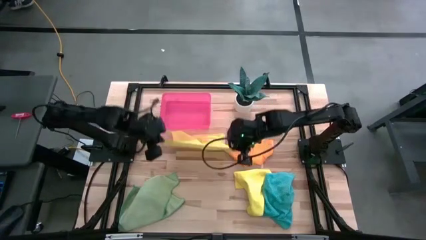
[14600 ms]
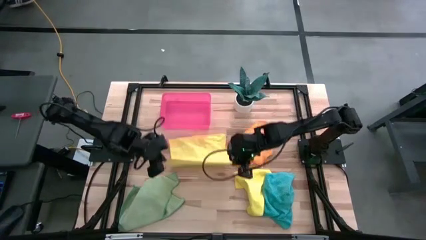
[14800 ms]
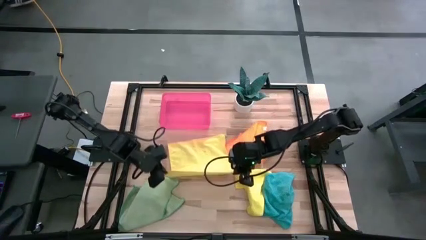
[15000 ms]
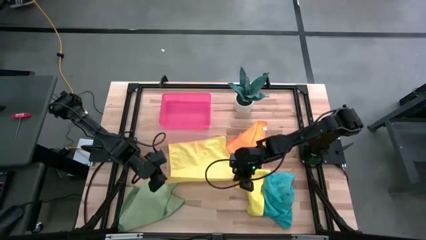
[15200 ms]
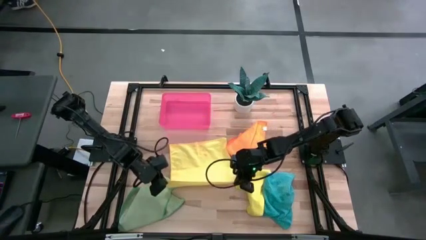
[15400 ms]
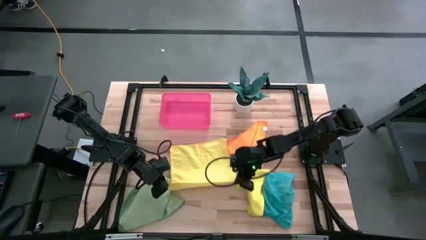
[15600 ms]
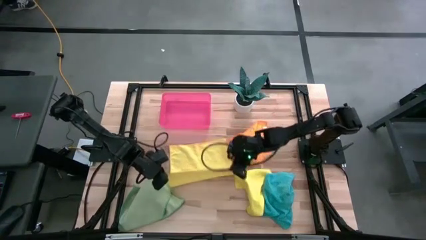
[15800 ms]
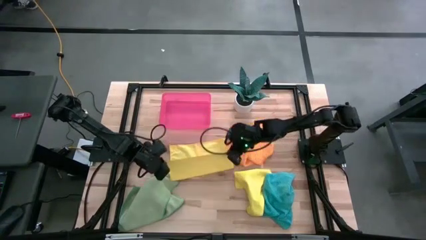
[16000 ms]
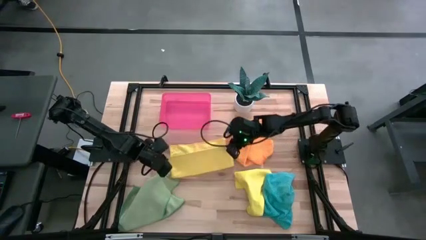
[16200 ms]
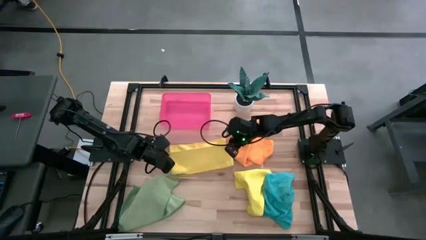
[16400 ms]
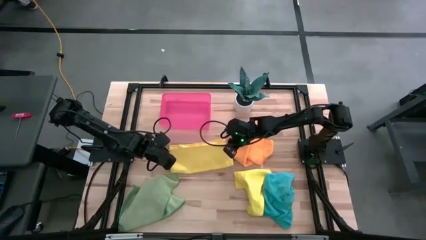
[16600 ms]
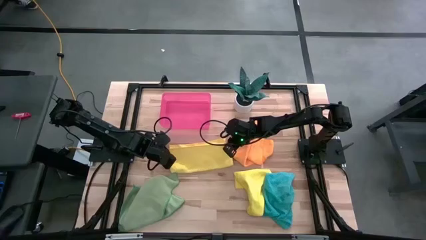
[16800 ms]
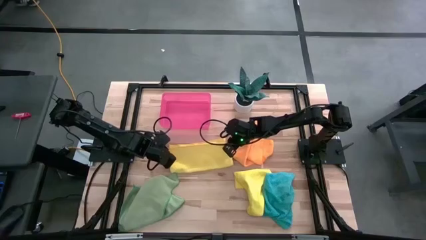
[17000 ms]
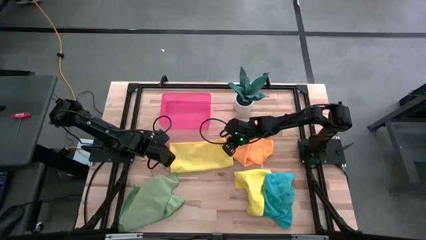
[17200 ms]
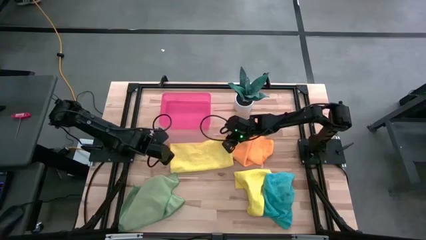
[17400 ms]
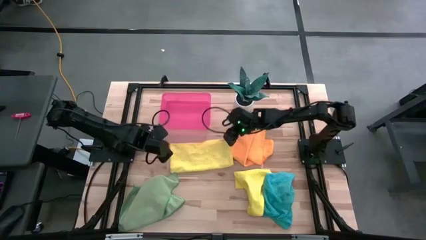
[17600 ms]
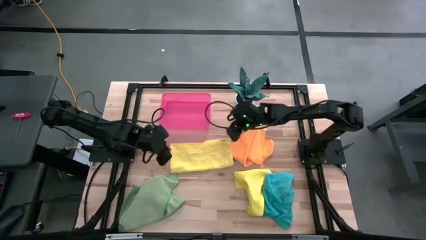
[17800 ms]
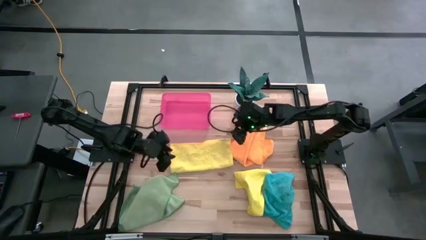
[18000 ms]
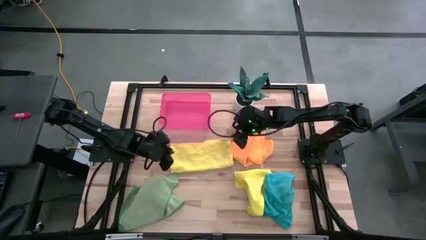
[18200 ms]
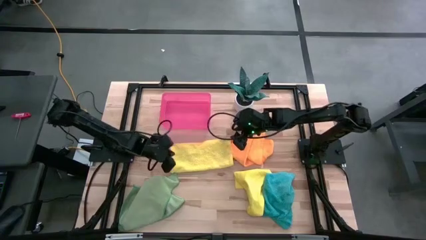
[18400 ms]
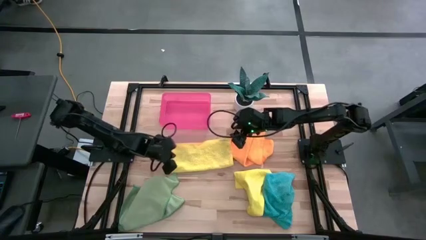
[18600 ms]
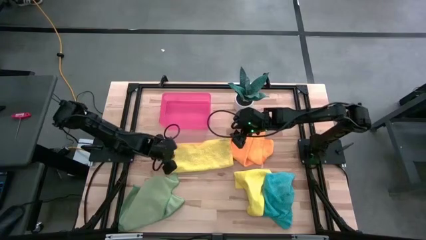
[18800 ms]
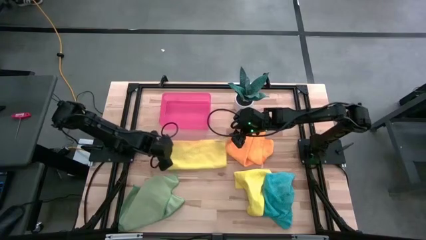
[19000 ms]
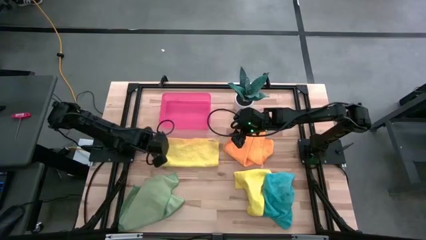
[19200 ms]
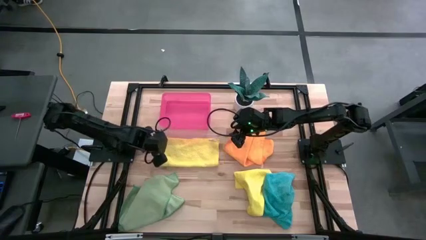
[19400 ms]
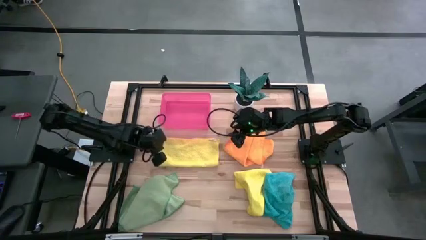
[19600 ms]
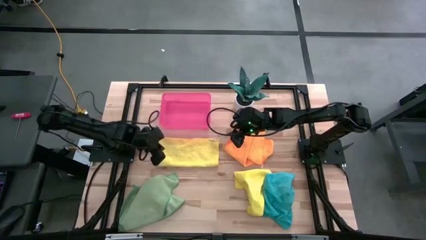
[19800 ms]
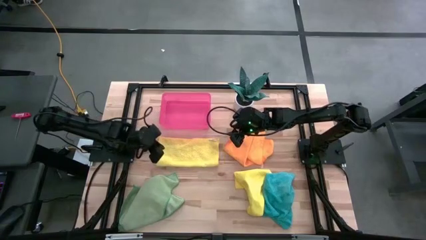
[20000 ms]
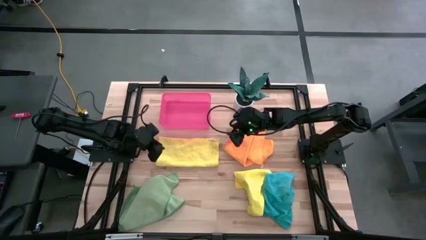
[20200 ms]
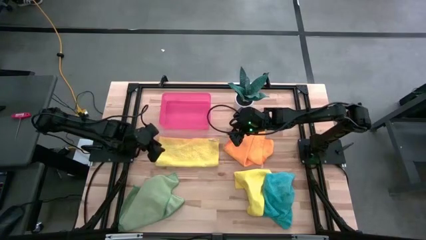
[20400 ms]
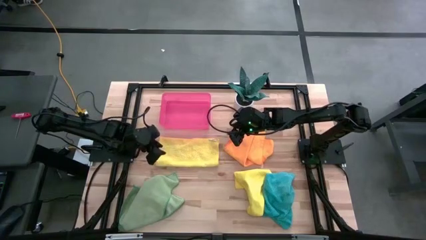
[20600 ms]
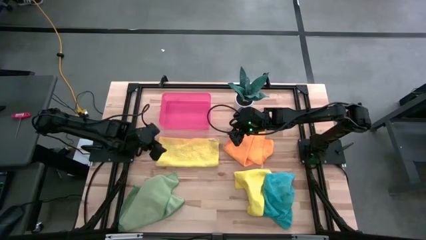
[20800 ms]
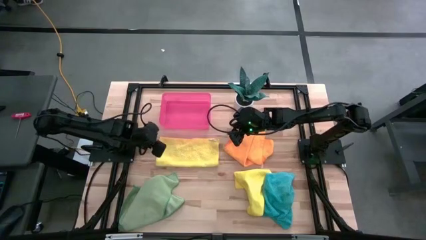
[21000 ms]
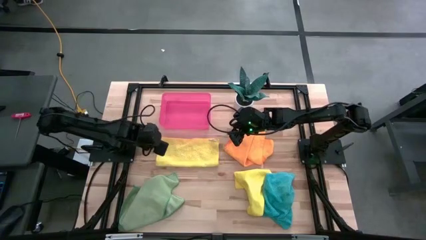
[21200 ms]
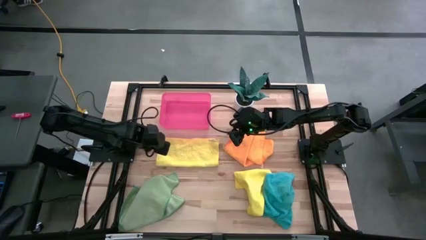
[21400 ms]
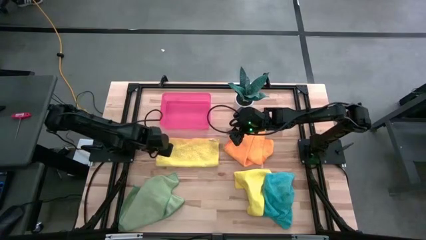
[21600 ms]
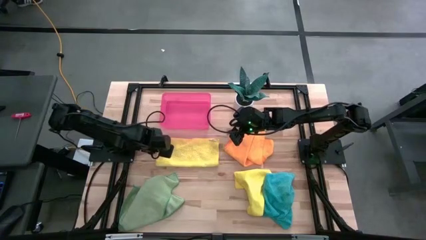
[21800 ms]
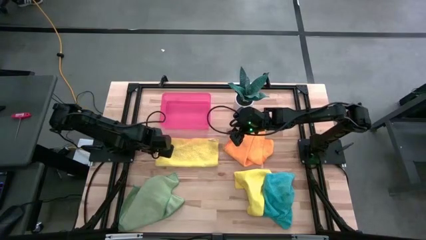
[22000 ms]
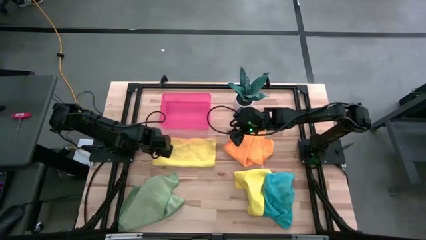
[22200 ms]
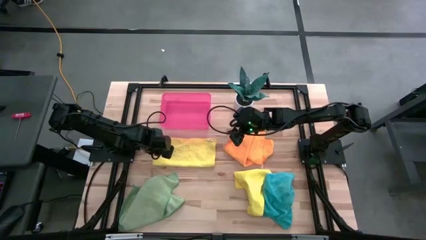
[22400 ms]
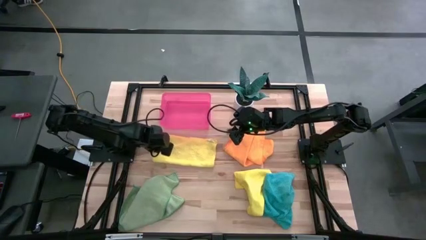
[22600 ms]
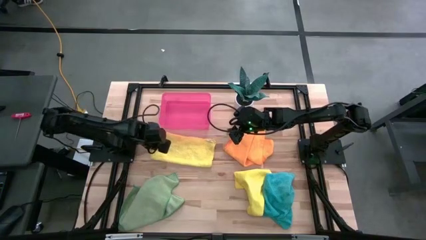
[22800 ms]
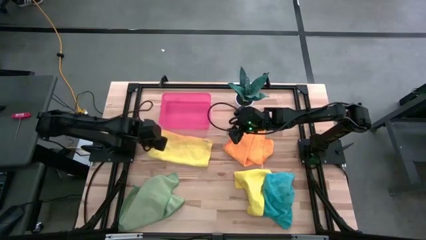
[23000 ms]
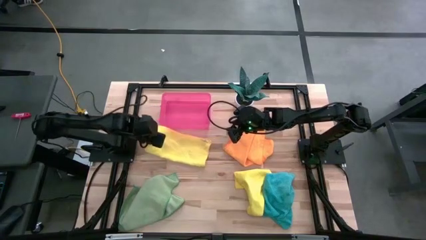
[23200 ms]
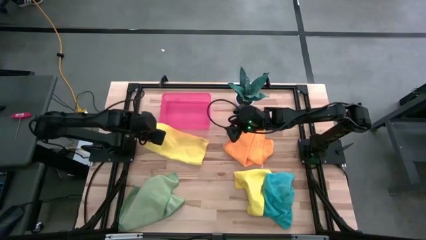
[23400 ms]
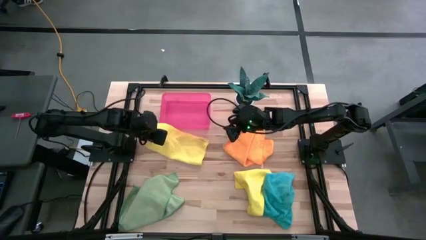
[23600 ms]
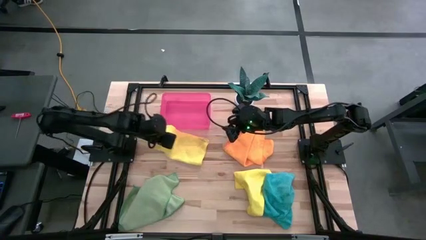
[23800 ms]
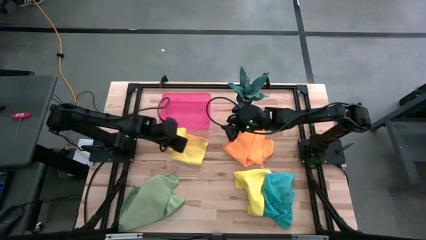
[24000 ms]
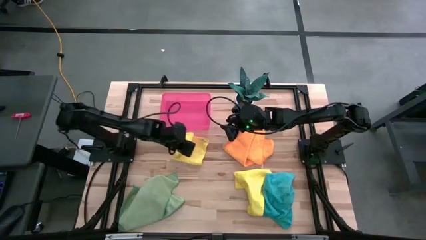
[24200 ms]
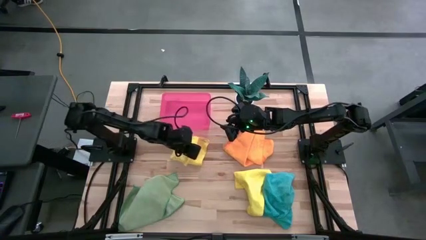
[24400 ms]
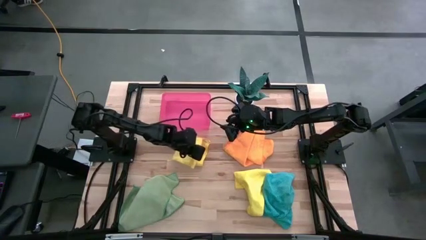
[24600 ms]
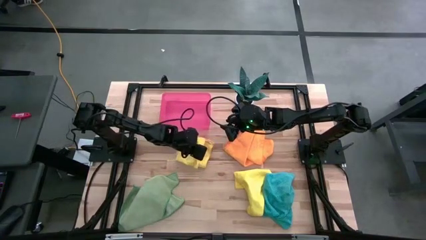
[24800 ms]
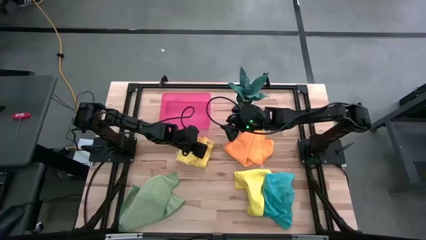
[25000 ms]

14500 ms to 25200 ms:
Task: Fold microfiber towels
Fold the top yellow microfiber towel

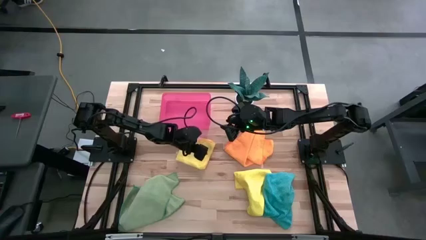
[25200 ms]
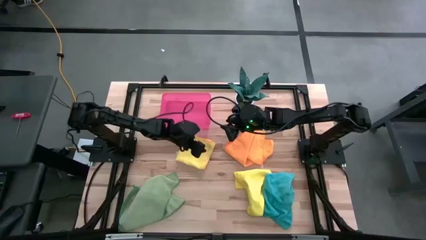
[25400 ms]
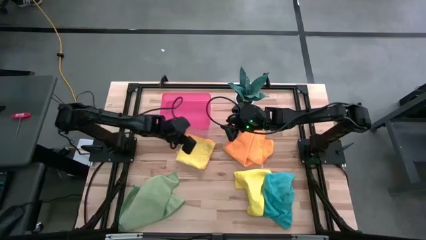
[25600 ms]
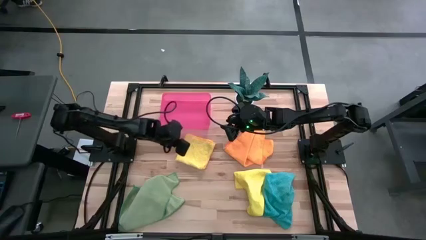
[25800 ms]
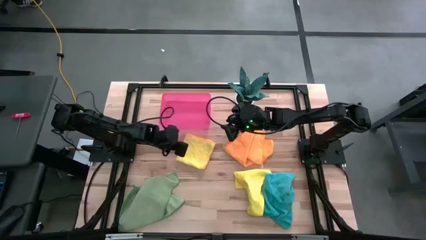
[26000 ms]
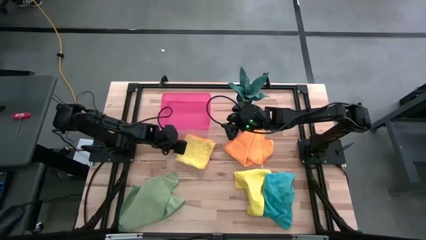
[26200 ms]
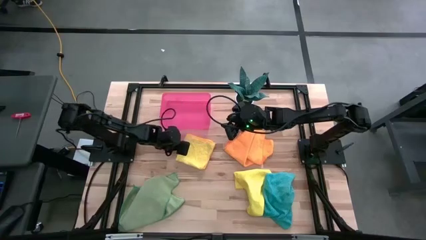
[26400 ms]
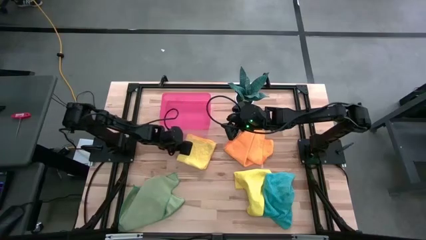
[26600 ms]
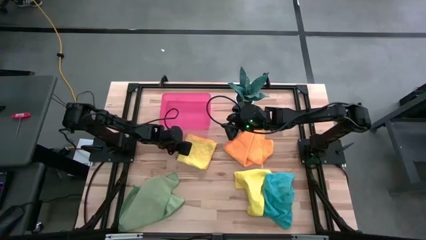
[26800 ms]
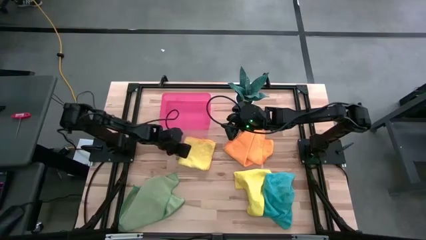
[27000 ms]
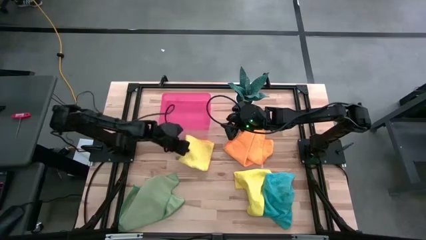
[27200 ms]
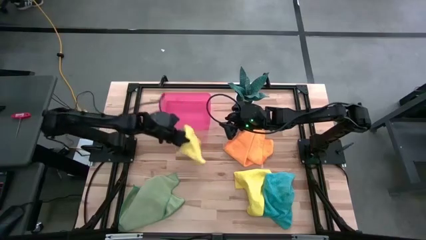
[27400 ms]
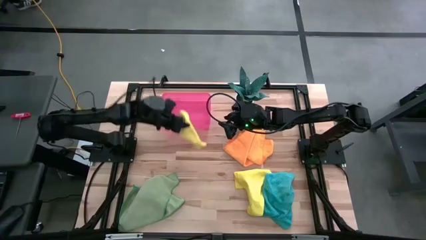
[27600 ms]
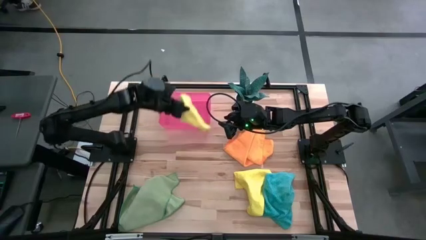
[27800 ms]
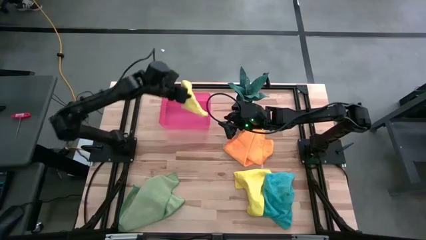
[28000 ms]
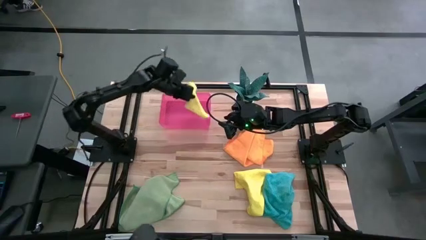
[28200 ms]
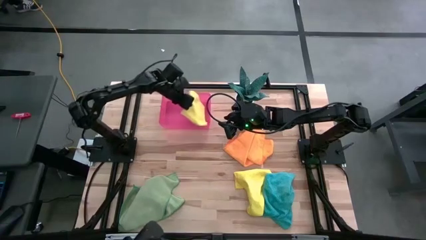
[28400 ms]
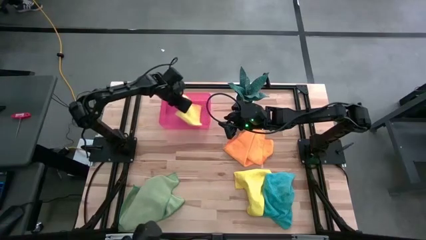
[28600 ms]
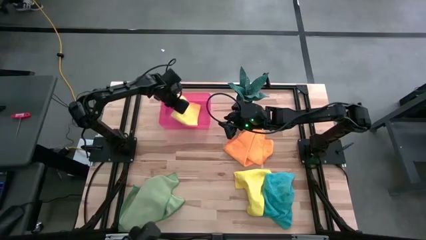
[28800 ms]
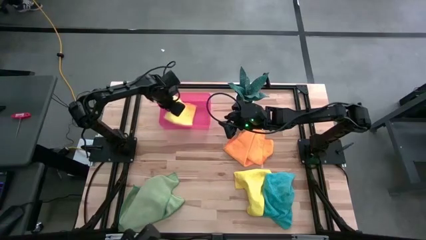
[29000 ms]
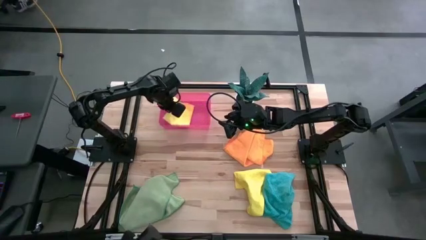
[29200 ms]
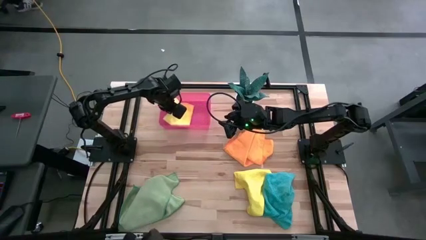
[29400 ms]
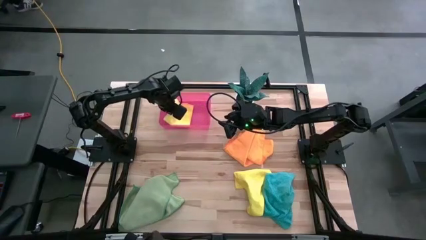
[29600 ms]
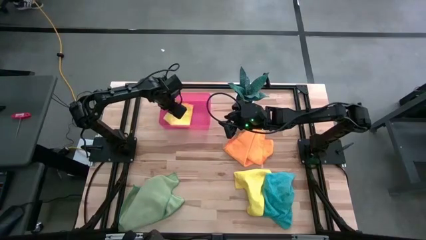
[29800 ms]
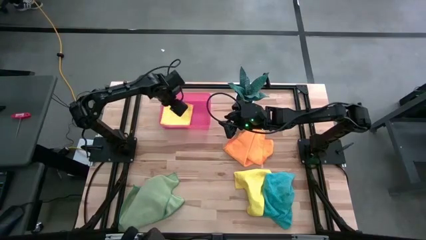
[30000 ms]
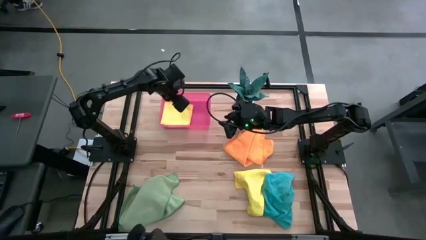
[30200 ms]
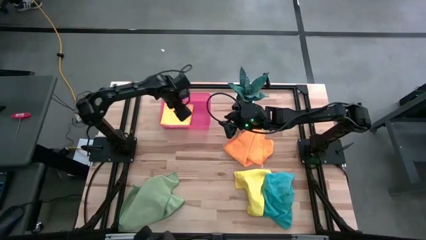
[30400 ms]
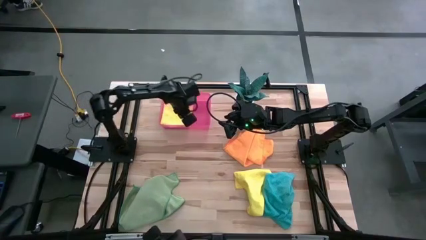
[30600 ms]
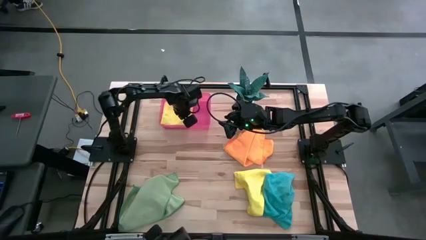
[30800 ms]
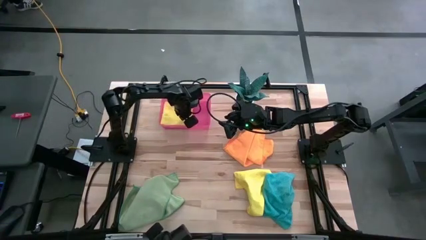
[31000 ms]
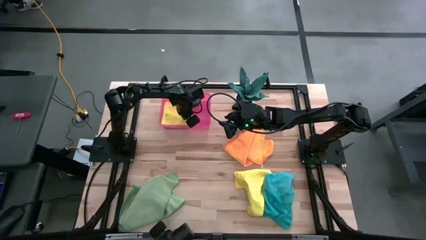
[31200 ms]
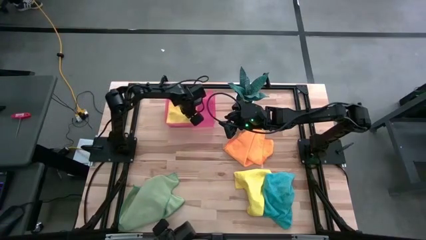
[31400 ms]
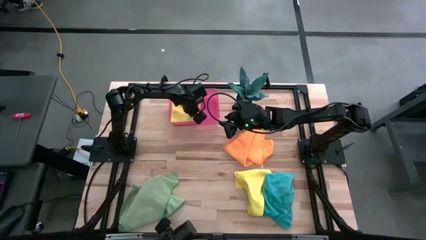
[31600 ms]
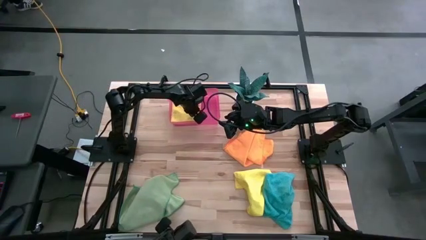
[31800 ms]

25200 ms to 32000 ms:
Put the top yellow microfiber towel into the bin
